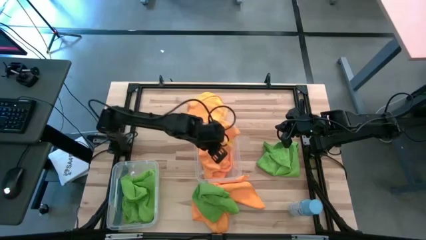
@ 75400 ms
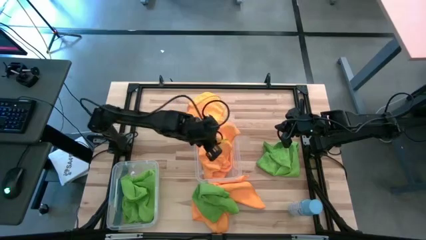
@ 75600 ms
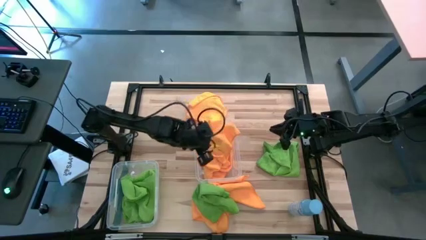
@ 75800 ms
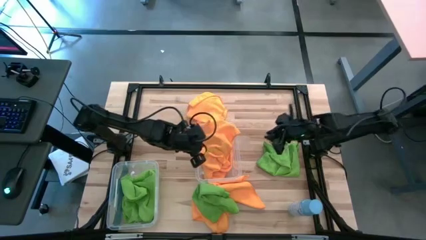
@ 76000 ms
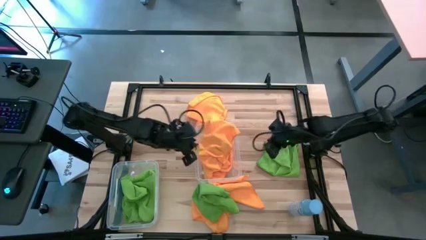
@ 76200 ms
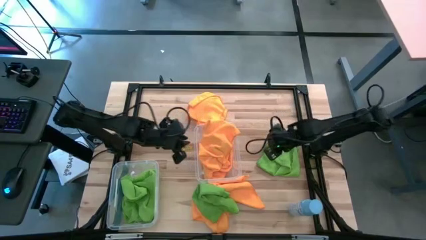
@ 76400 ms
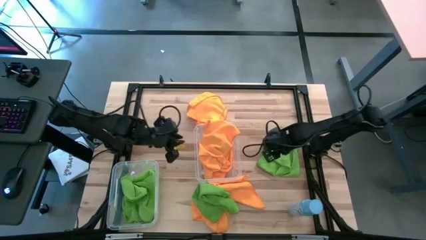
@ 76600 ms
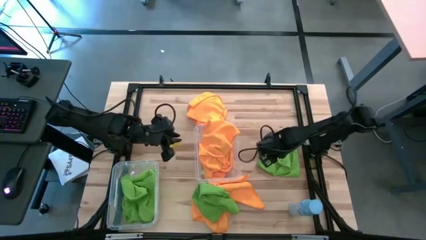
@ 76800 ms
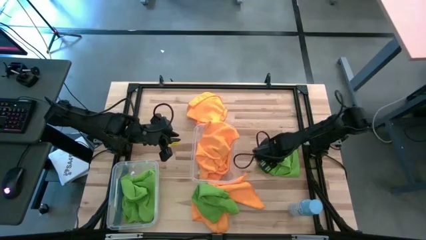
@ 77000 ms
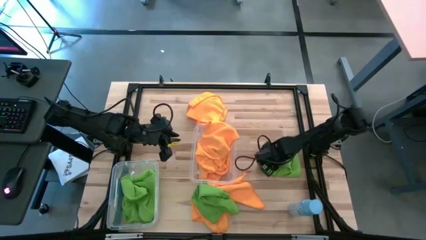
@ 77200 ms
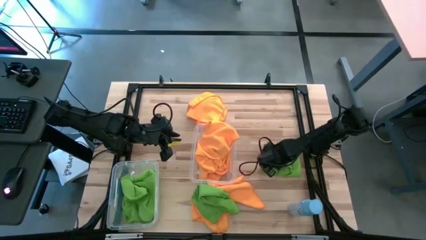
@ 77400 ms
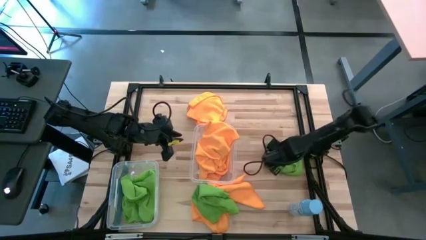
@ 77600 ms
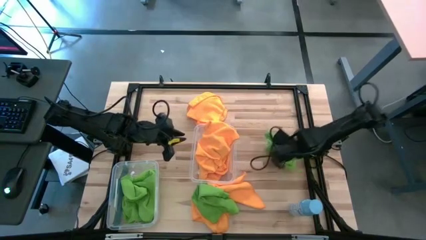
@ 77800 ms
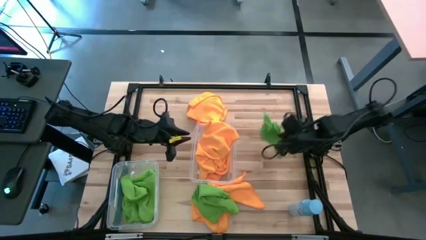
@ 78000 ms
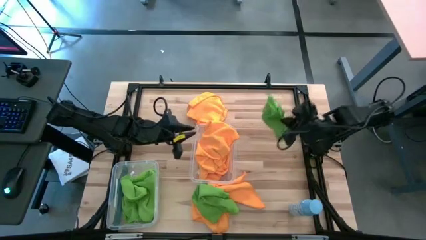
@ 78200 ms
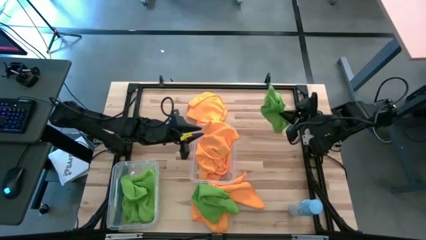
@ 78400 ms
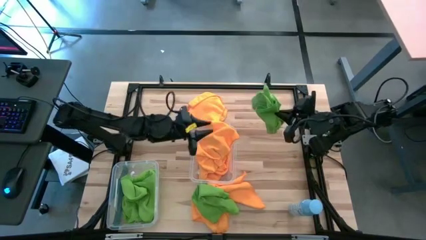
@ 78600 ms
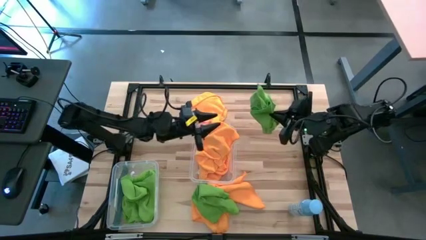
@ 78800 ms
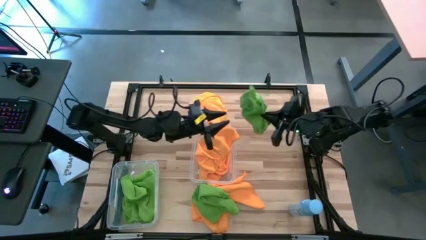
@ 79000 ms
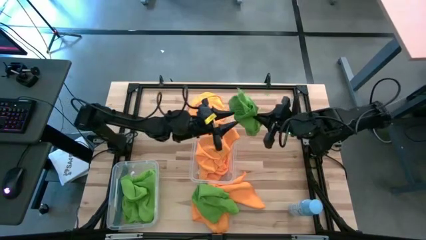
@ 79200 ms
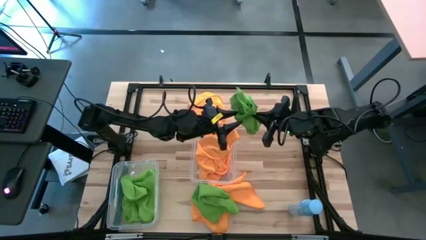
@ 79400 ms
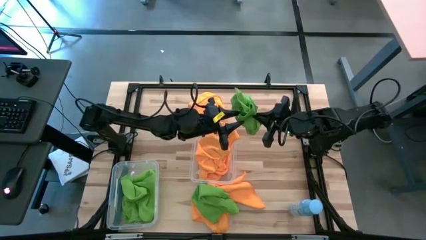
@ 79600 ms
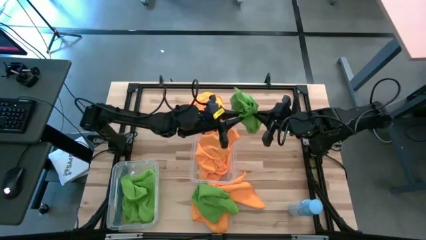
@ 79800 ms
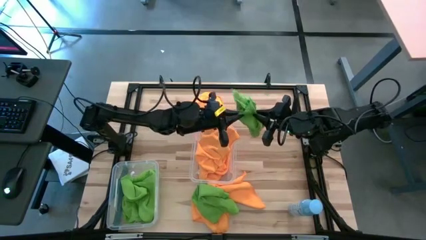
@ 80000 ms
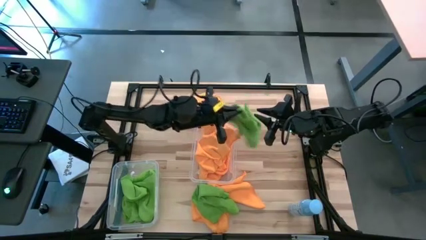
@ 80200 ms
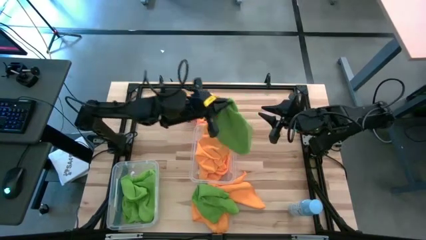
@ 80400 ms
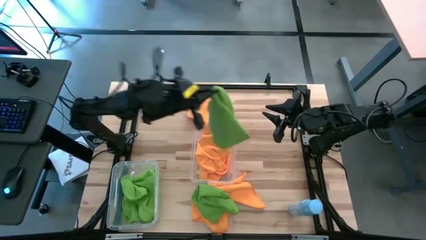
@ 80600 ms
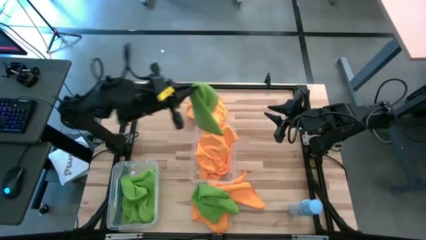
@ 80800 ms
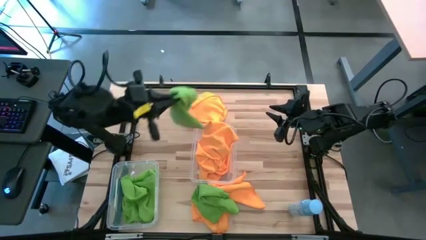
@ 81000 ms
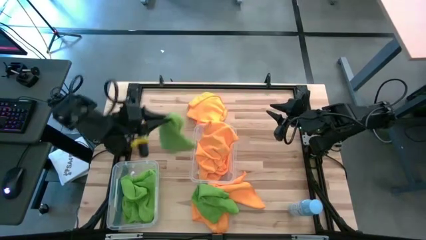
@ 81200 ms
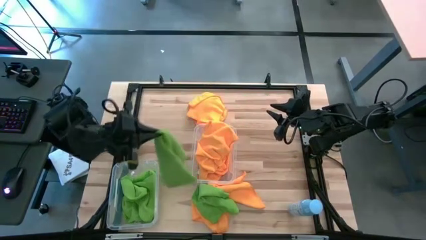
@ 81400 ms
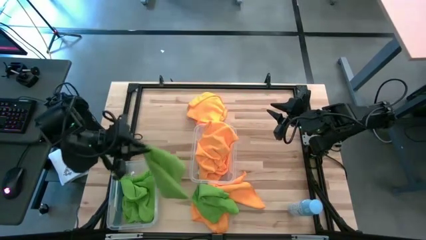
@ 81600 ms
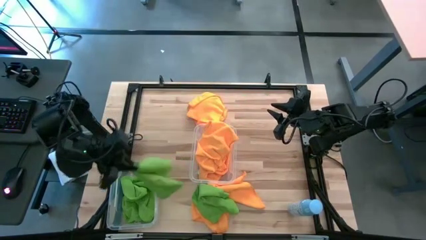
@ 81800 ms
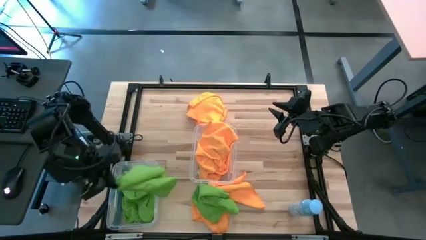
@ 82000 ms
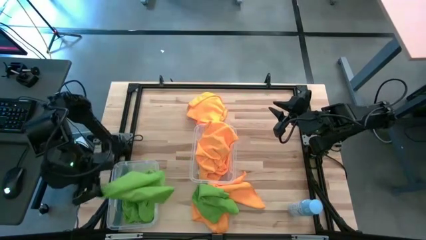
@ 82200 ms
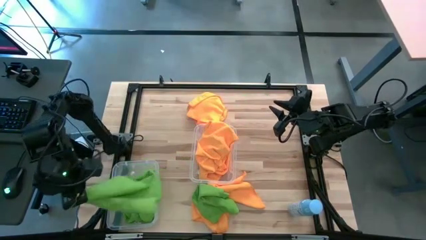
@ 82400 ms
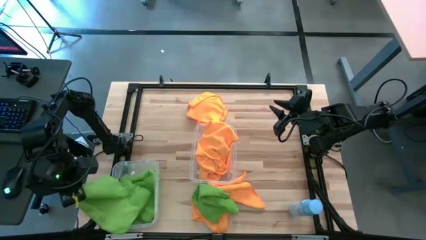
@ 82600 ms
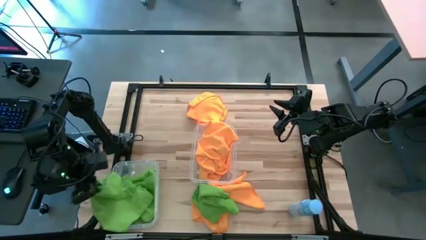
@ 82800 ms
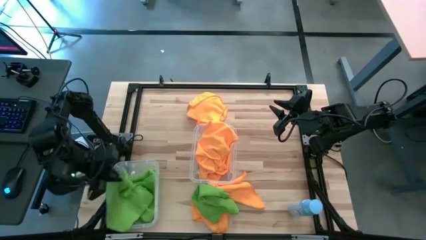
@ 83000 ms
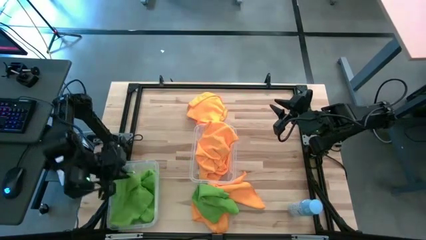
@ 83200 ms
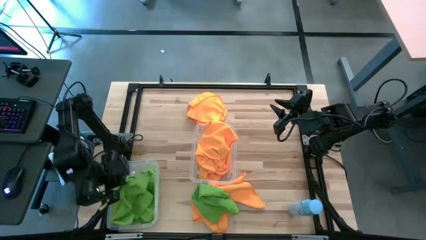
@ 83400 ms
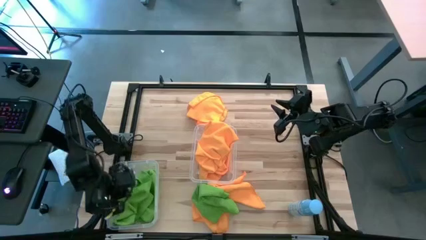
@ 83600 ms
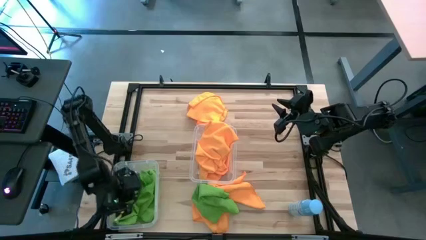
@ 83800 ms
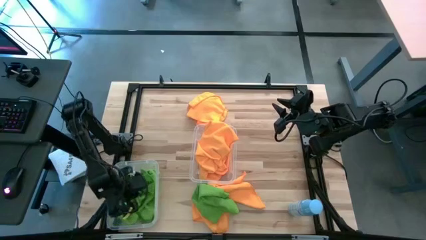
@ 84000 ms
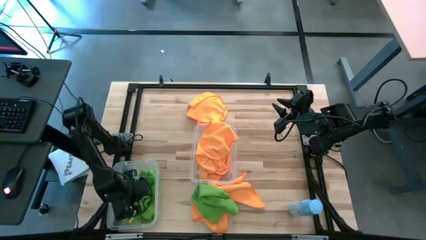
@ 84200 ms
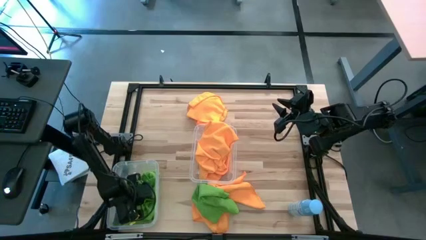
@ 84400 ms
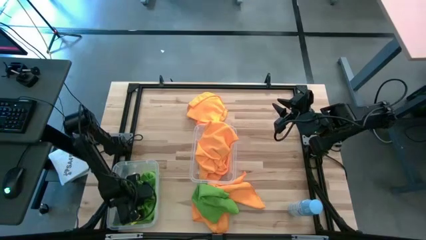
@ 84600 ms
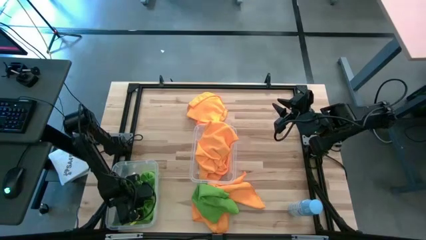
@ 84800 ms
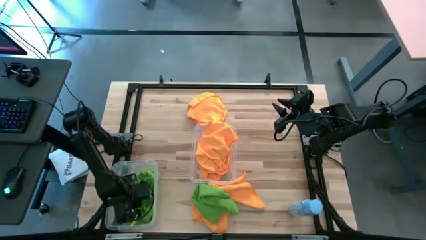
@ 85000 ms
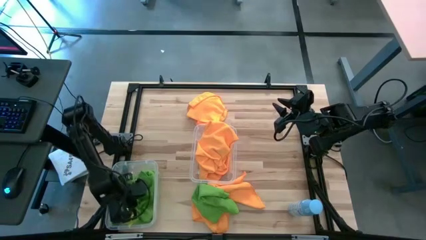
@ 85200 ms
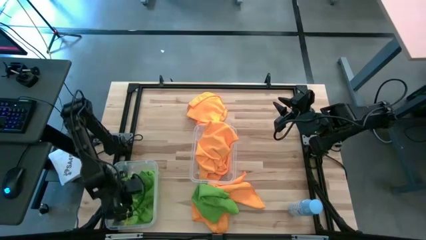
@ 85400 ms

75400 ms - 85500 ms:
Task: Sort microfiber towel by color & place in baskets
Put the right green microfiber cloth into the left transparent bin

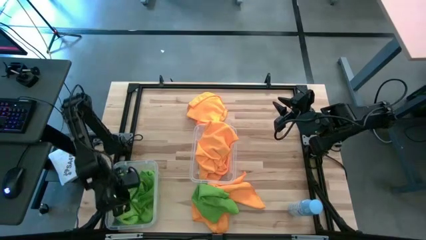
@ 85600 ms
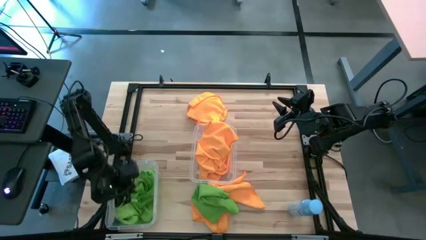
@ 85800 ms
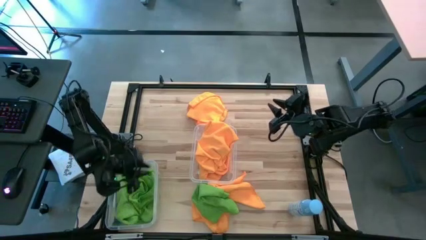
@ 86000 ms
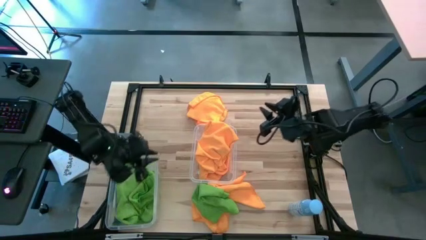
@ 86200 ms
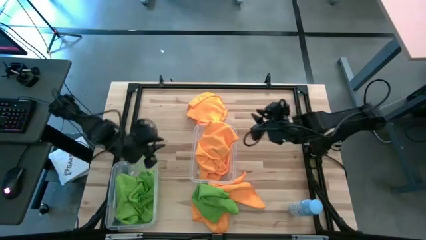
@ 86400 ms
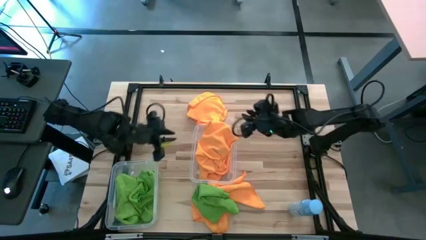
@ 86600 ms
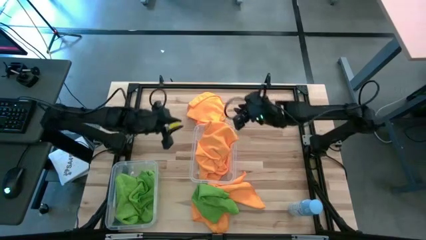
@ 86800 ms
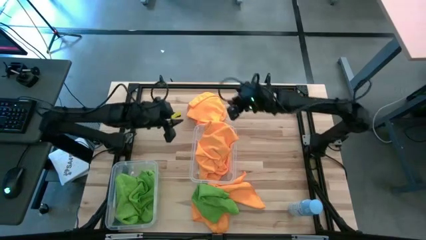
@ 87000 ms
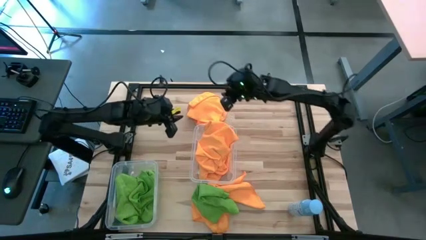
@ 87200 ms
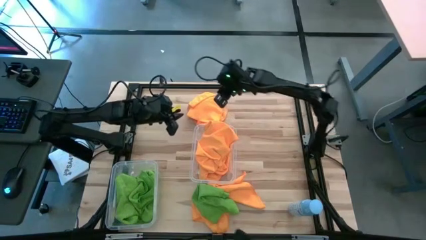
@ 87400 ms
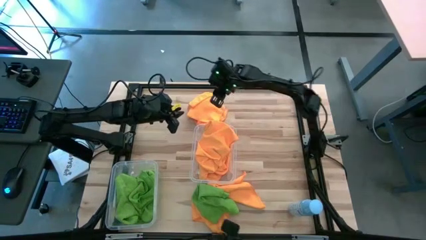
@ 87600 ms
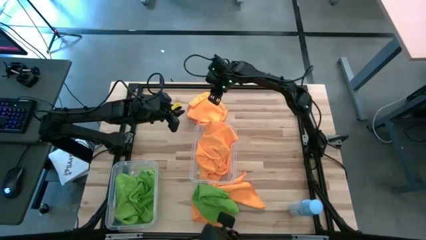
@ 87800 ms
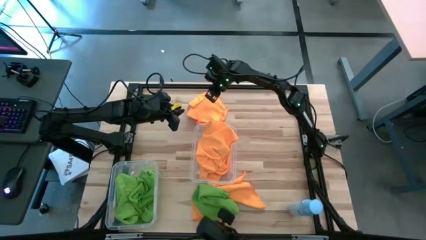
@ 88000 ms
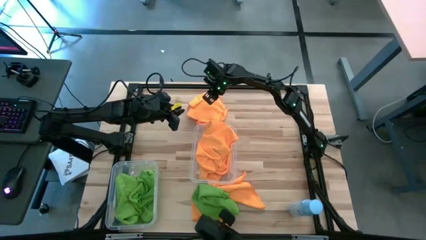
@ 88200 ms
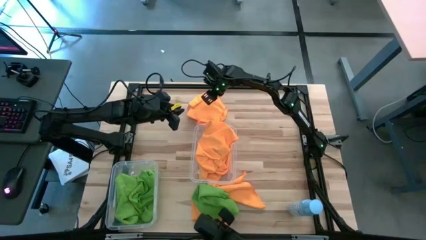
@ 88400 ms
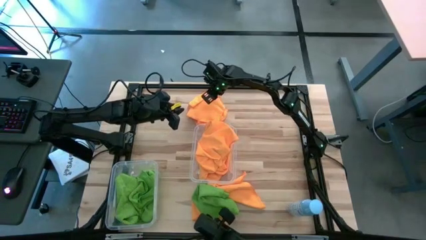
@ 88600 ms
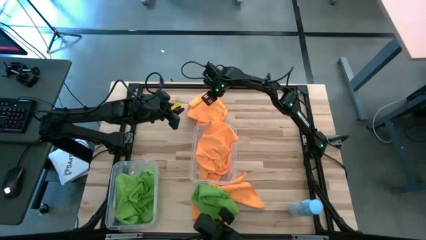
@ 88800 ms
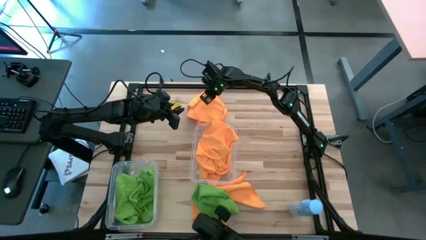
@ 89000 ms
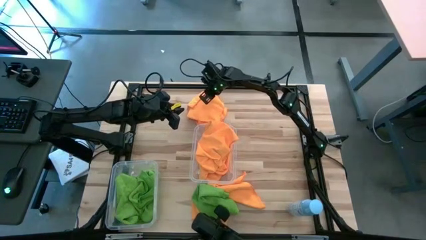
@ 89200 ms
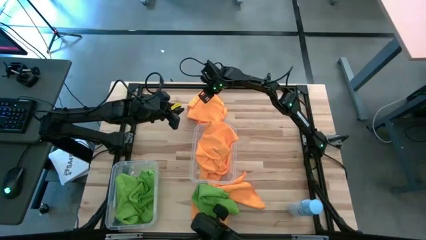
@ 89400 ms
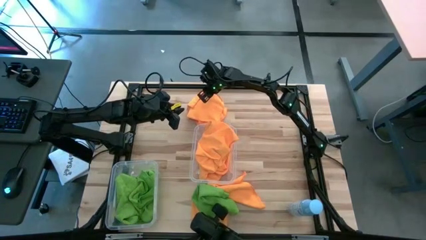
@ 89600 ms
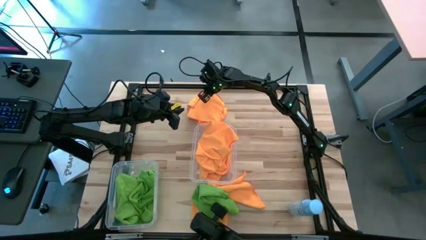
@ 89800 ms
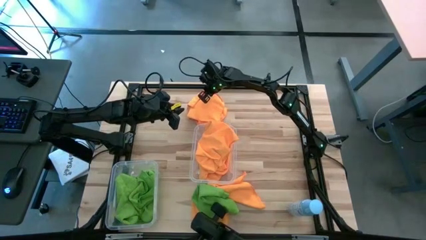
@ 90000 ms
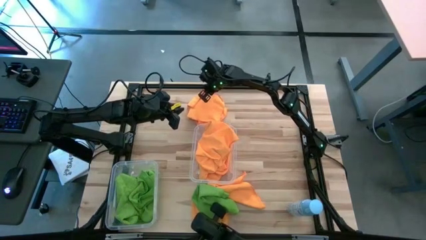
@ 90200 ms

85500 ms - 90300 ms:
Put the yellow microfiber towel into the right transparent bin

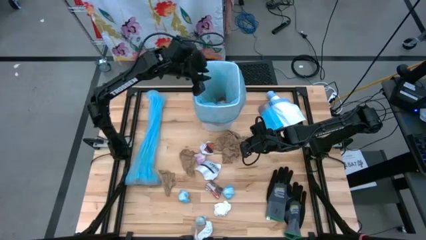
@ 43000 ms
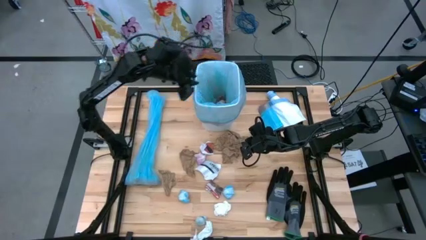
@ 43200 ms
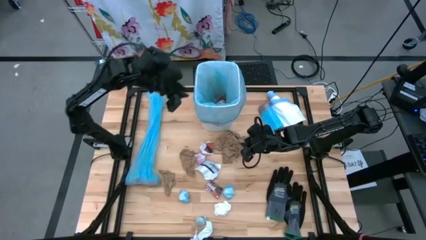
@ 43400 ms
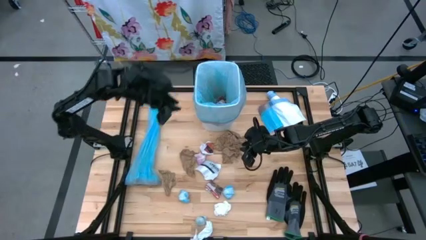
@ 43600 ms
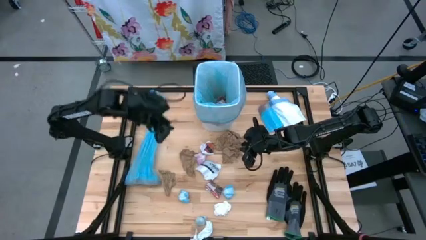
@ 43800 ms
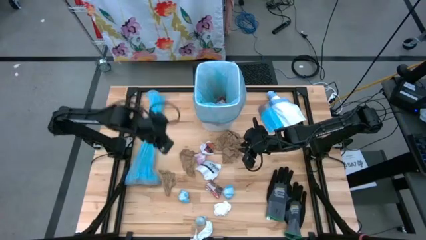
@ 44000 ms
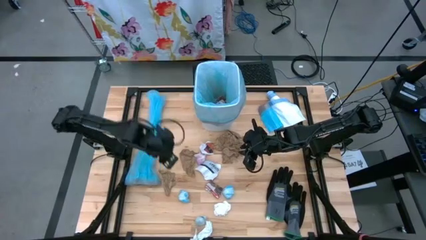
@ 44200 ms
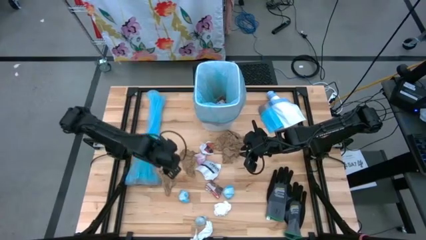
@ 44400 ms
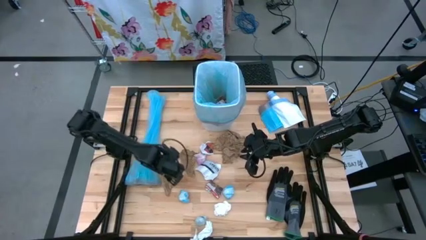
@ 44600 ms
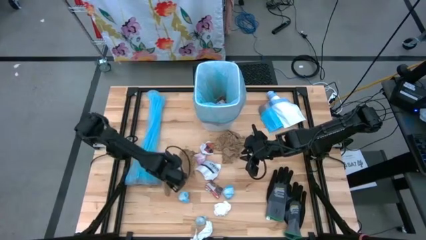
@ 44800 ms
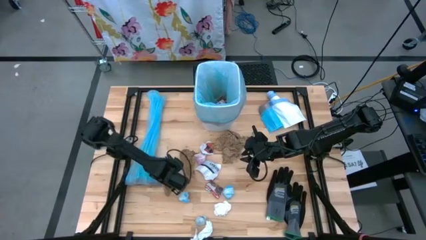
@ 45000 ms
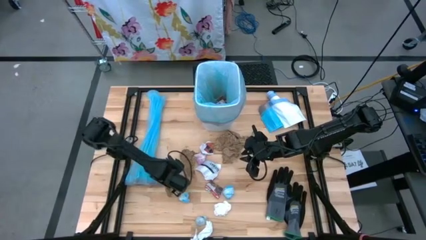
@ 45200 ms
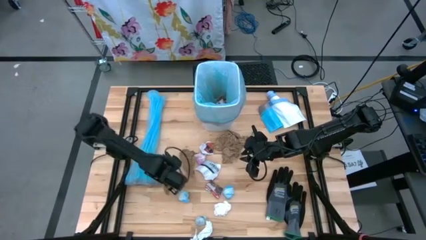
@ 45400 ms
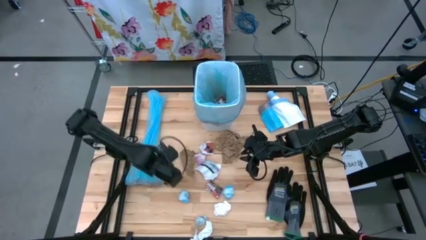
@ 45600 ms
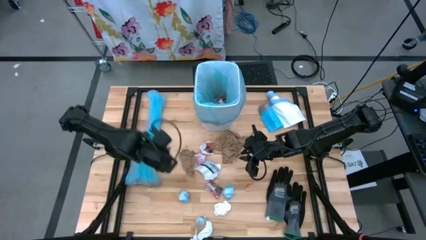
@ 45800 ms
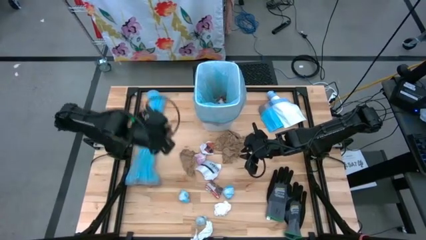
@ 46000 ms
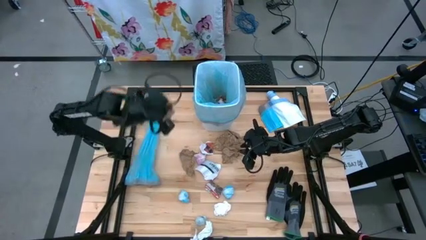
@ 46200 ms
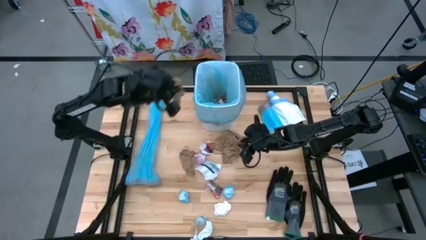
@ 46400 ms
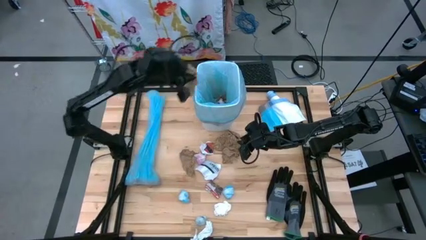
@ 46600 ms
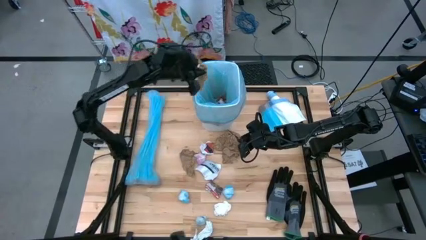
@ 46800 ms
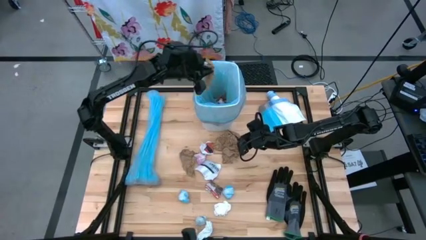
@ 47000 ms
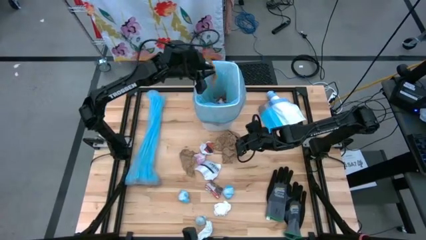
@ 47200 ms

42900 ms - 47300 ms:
Task: place trash/remove bag and relplace
Put the brown paper into the blue trash bag inside the white trash bin
